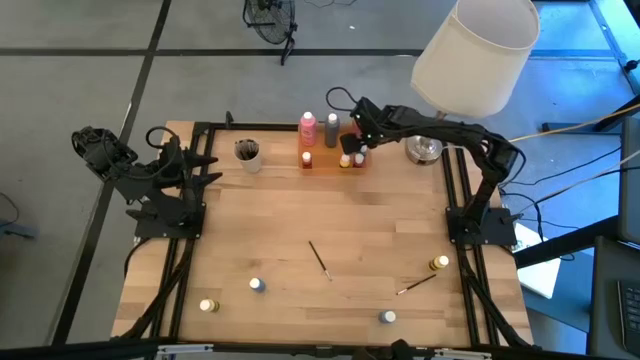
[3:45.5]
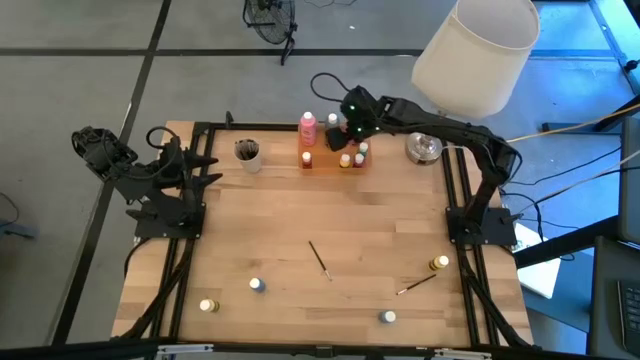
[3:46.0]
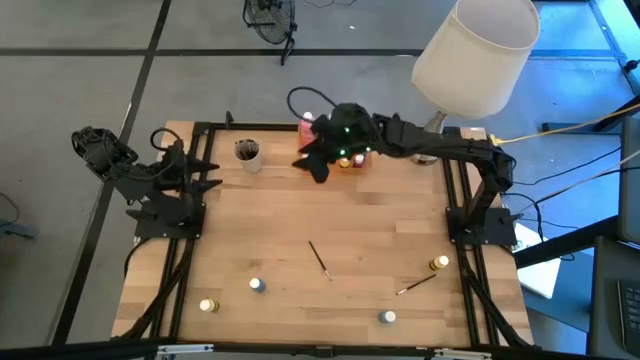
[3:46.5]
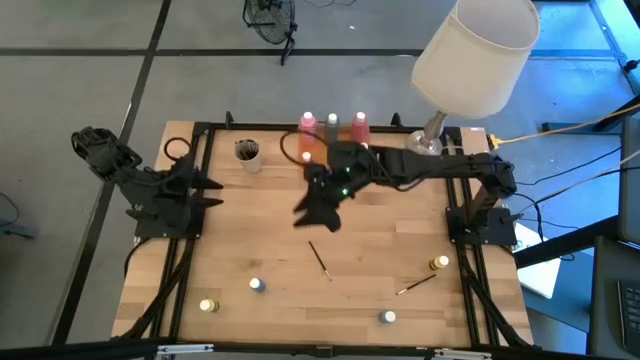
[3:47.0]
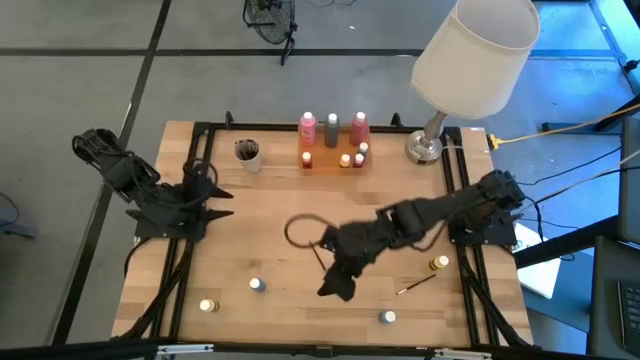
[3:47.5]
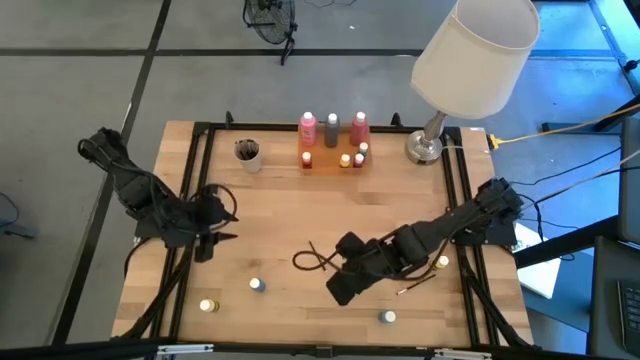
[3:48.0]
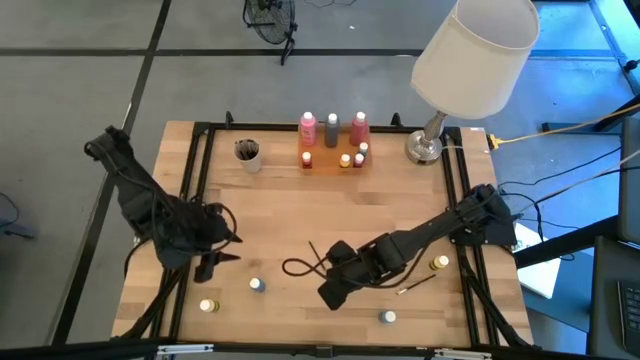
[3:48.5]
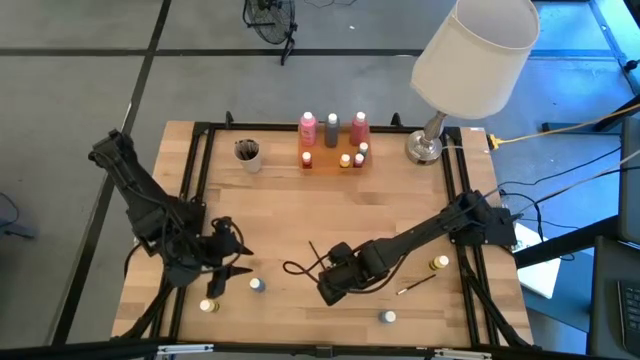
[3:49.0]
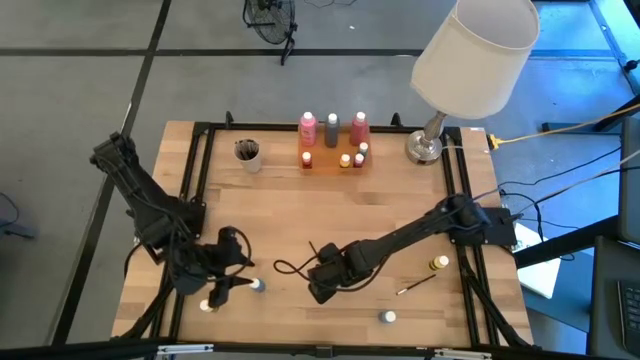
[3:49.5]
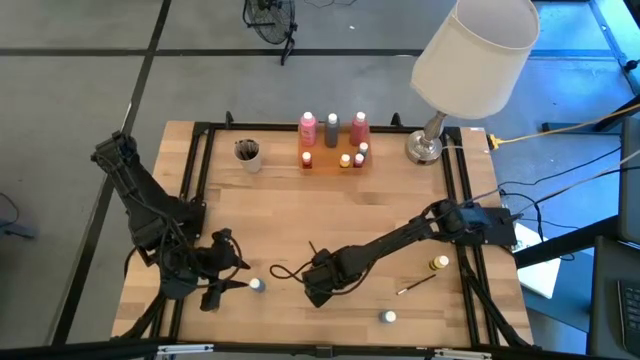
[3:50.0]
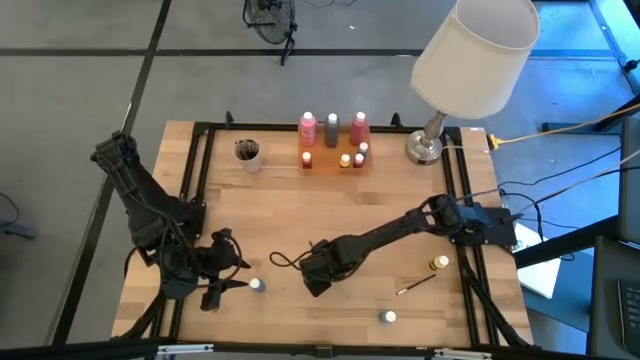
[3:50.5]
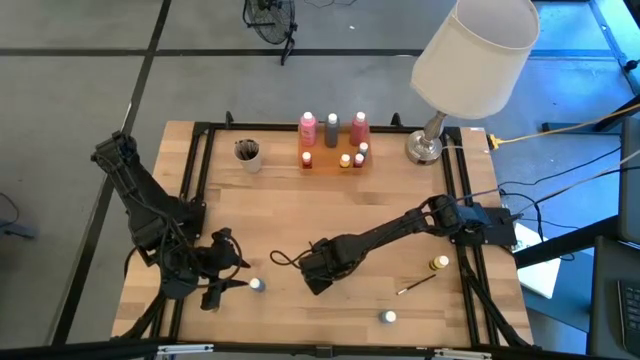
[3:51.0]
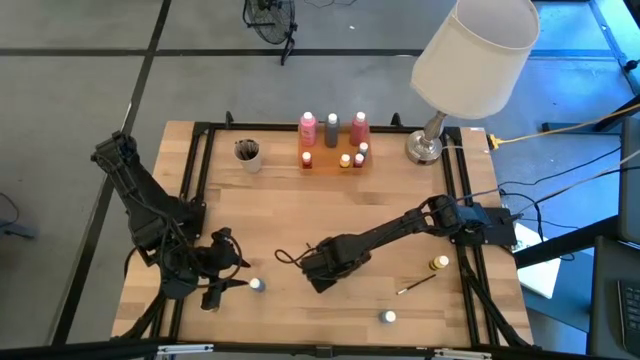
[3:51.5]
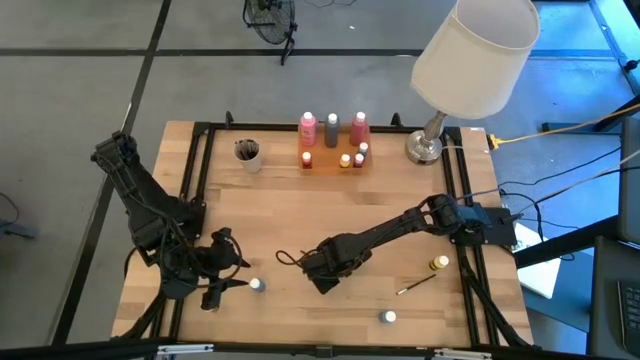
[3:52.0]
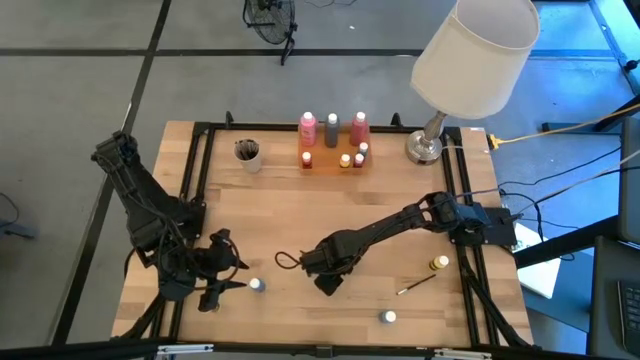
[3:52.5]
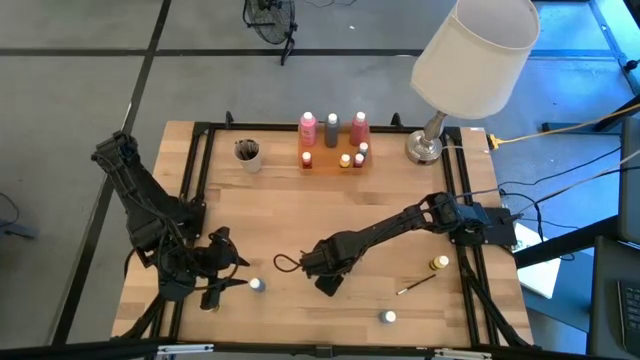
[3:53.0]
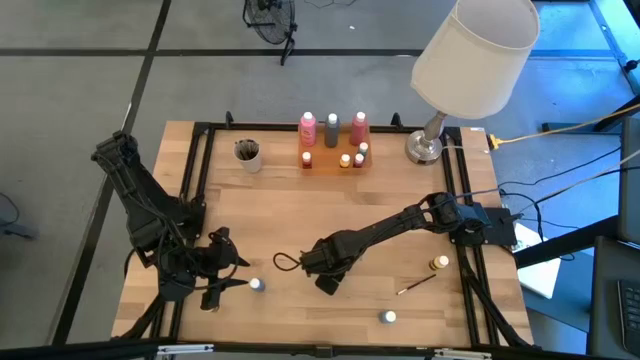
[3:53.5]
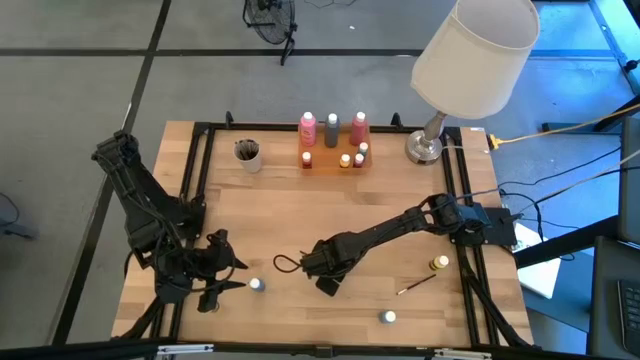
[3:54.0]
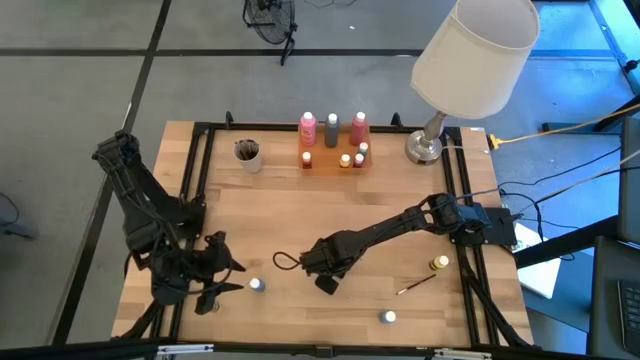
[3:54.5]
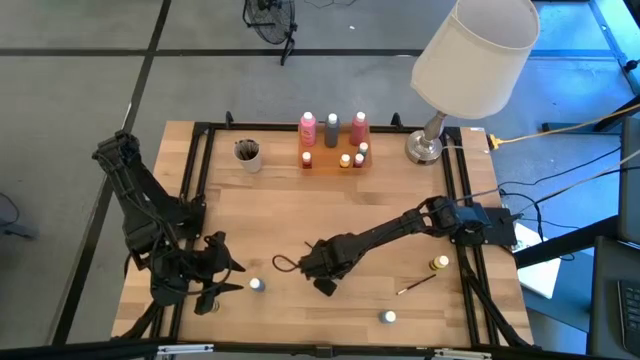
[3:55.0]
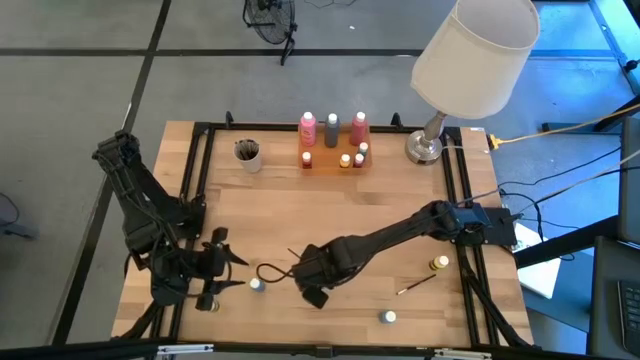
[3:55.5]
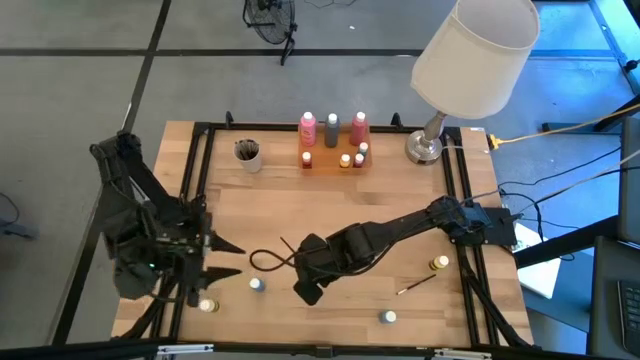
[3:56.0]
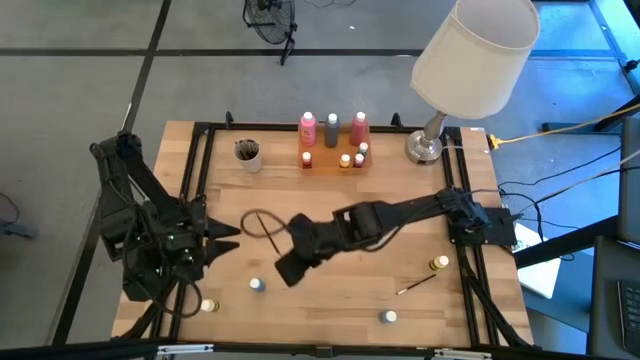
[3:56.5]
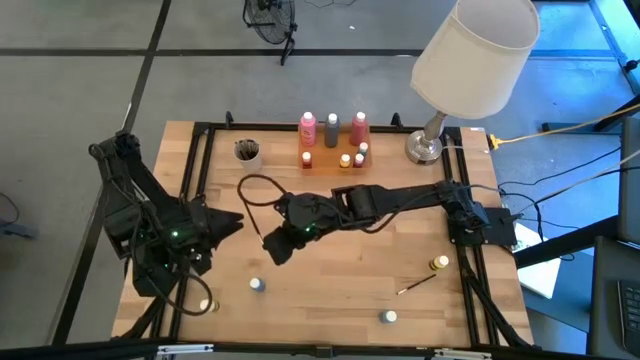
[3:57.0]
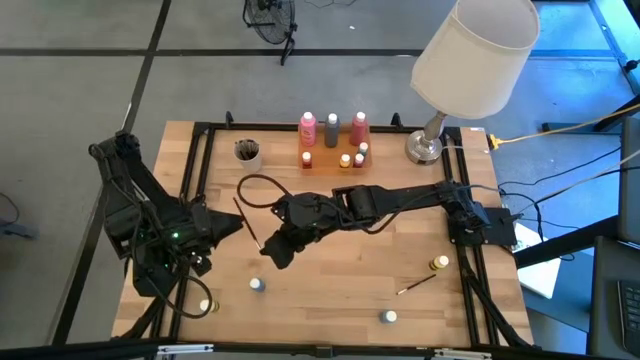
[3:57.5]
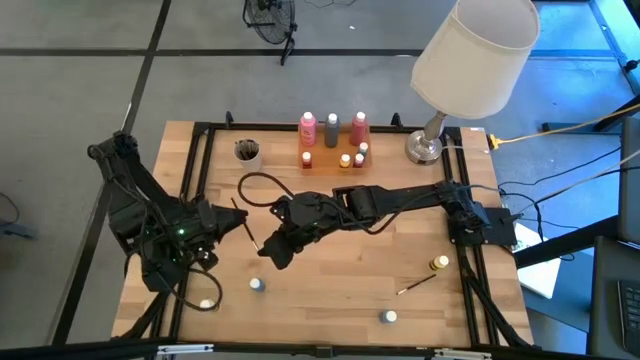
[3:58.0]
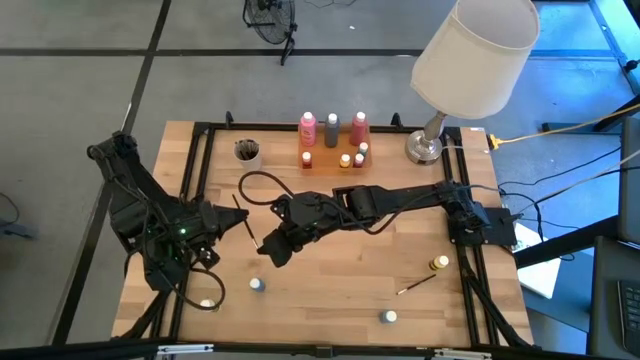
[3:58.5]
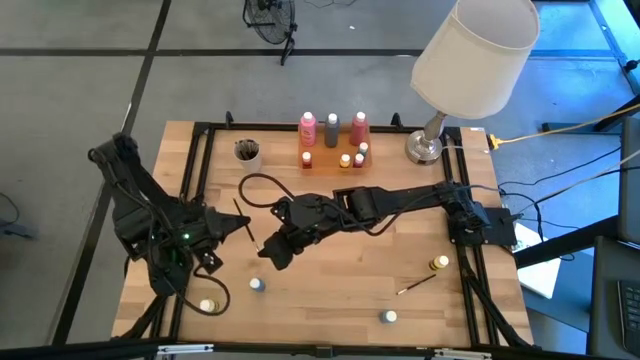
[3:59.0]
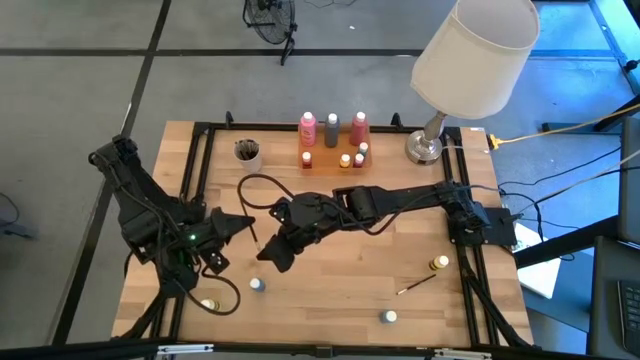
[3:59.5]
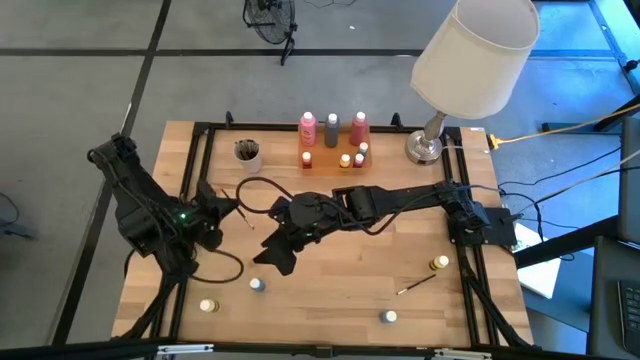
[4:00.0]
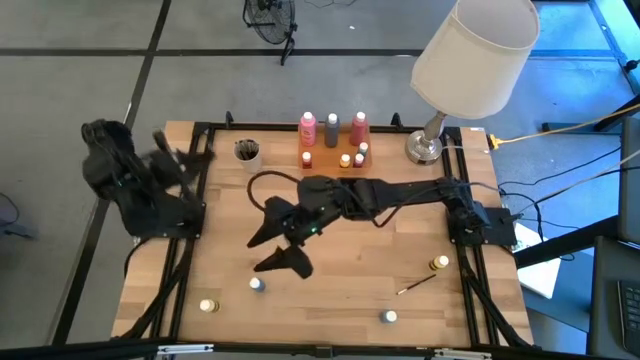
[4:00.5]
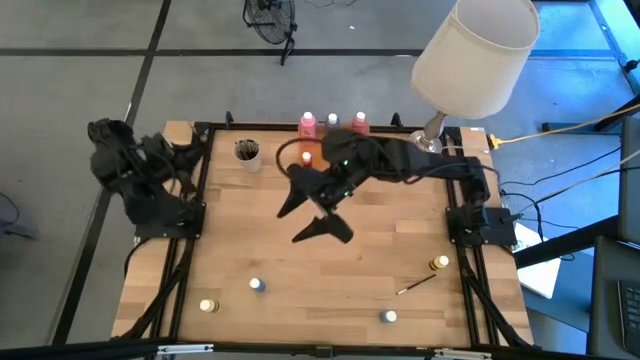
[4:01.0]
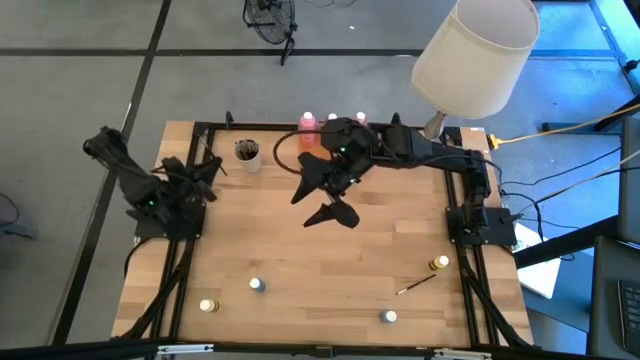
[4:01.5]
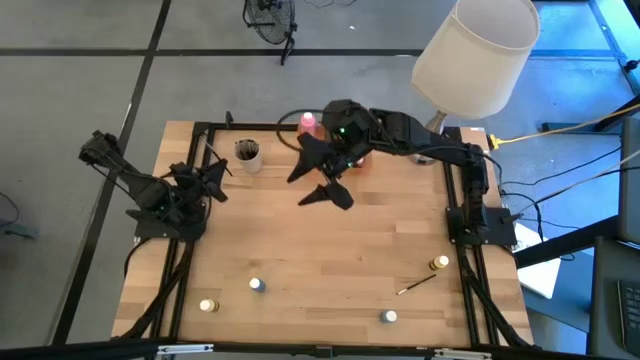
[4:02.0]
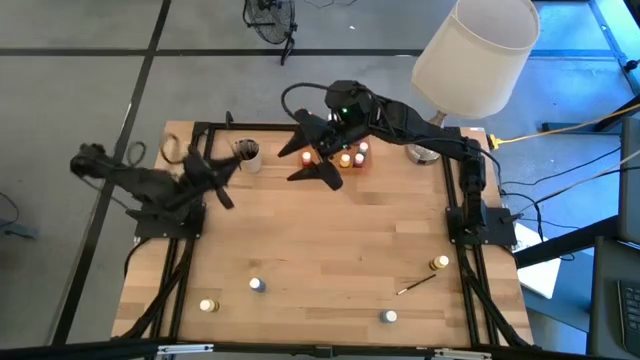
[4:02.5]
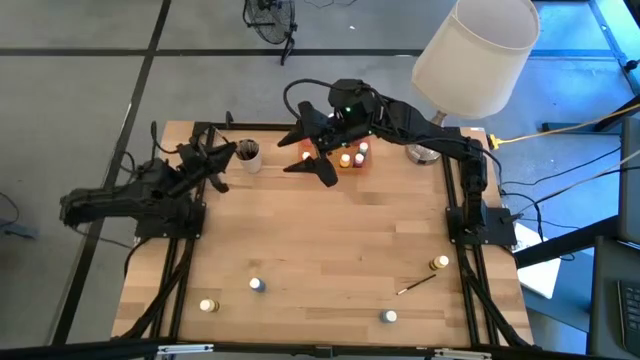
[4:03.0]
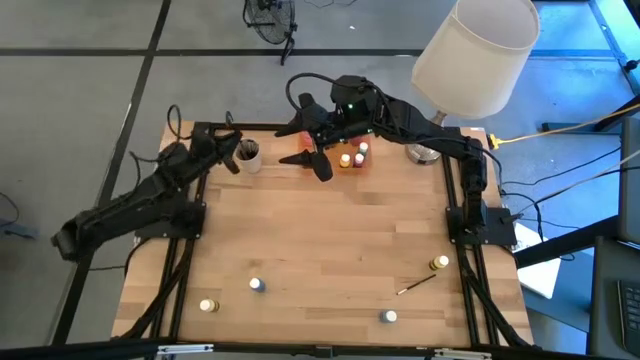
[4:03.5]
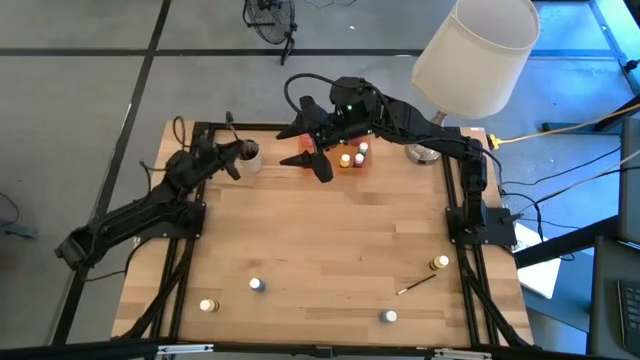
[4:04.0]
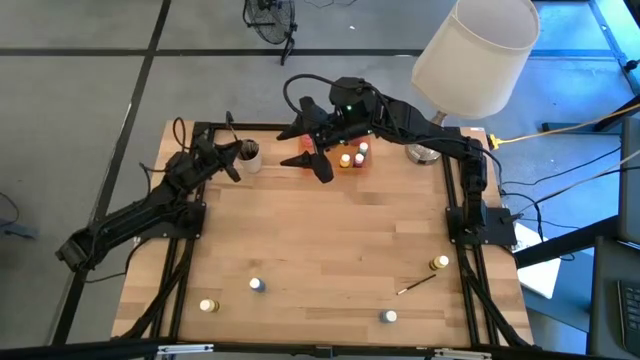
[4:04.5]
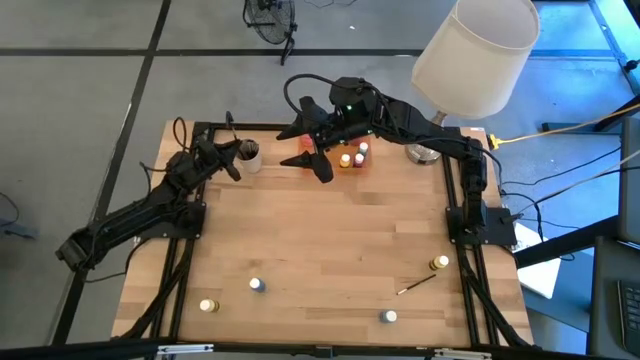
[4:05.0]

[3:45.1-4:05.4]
Task: Pick & Place Paint Supplies
Put the silver paint brush into the white cup
